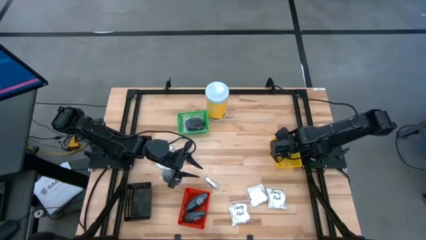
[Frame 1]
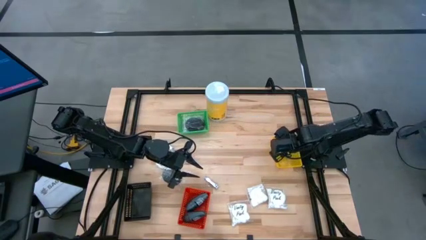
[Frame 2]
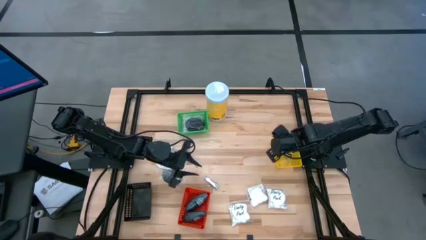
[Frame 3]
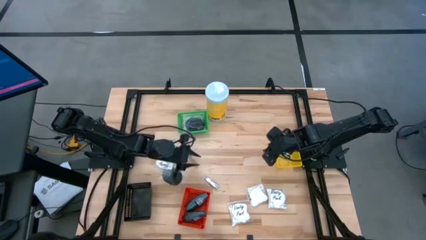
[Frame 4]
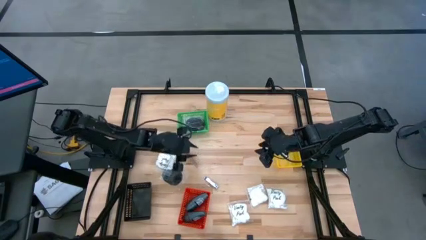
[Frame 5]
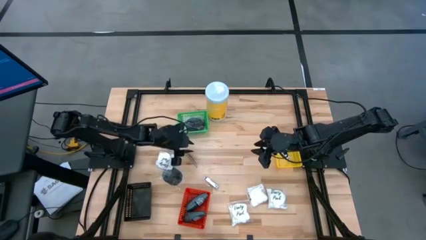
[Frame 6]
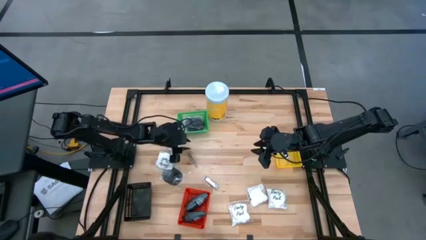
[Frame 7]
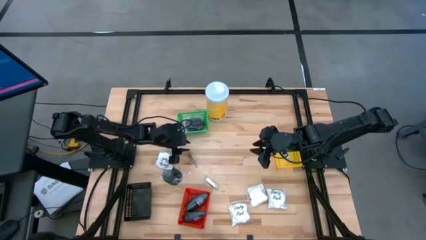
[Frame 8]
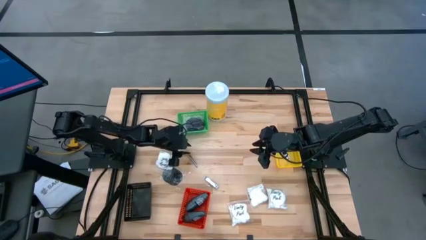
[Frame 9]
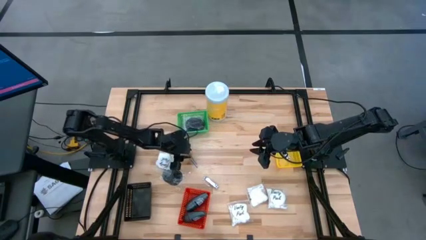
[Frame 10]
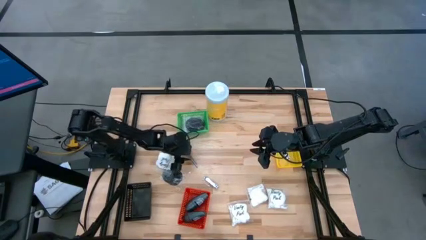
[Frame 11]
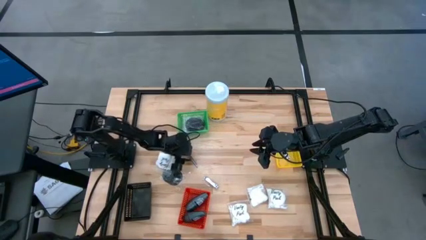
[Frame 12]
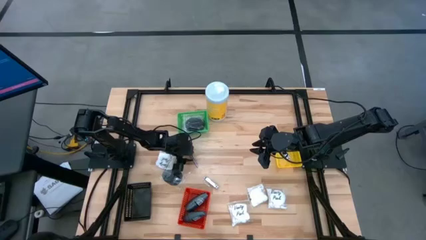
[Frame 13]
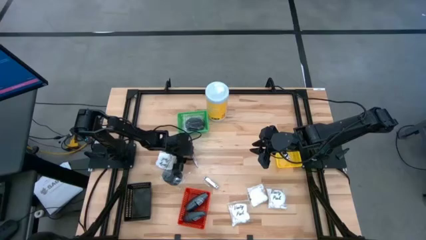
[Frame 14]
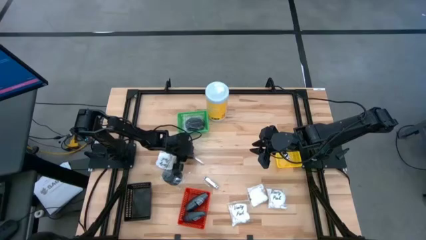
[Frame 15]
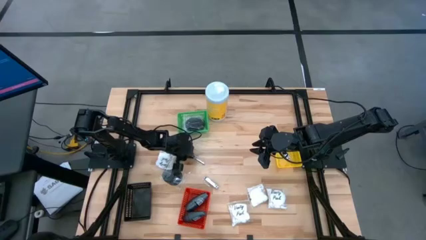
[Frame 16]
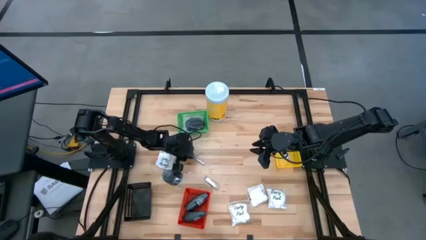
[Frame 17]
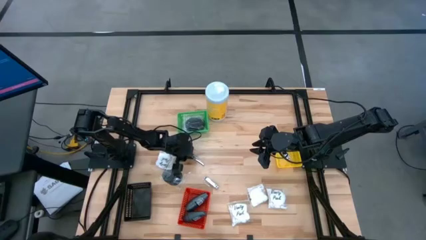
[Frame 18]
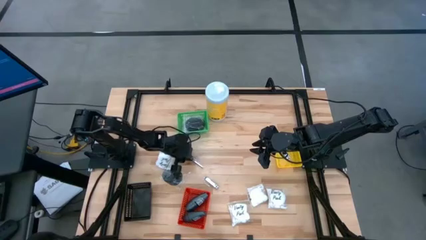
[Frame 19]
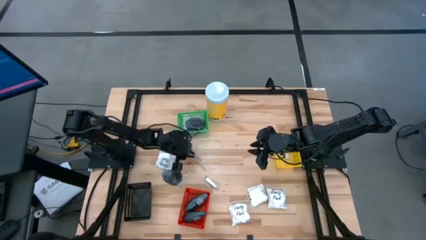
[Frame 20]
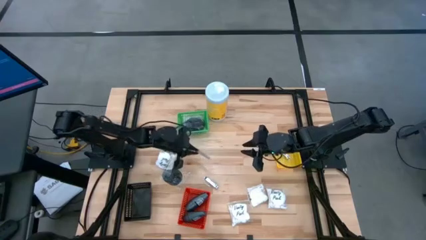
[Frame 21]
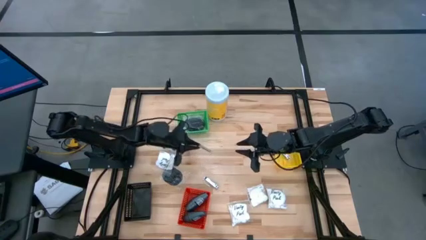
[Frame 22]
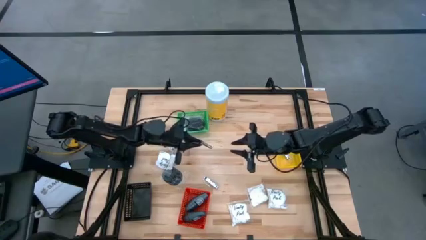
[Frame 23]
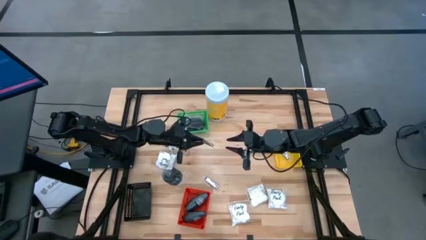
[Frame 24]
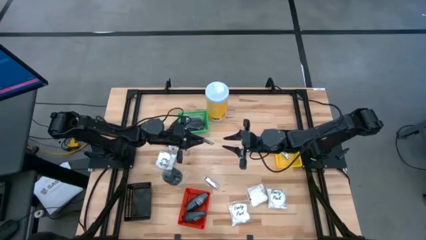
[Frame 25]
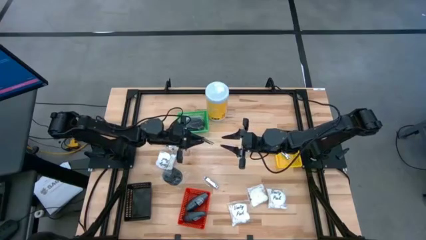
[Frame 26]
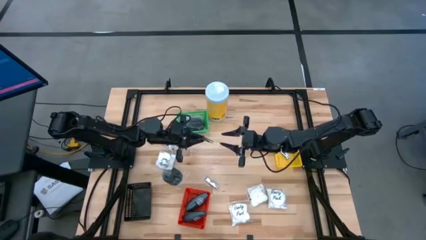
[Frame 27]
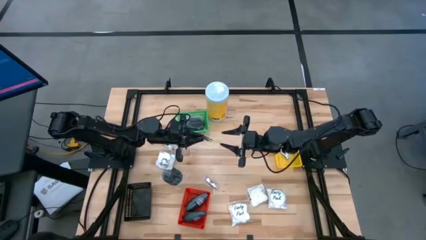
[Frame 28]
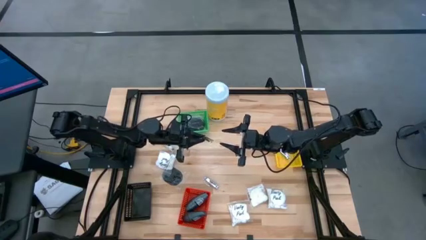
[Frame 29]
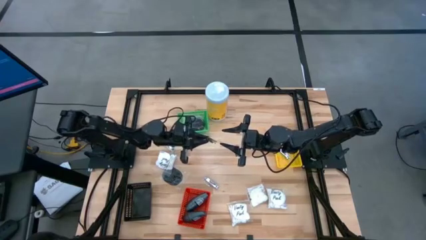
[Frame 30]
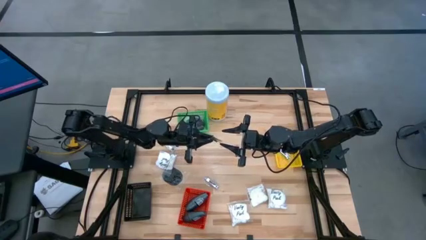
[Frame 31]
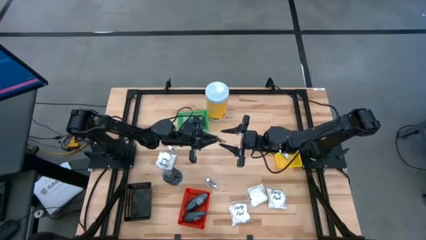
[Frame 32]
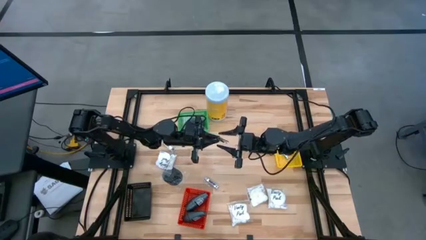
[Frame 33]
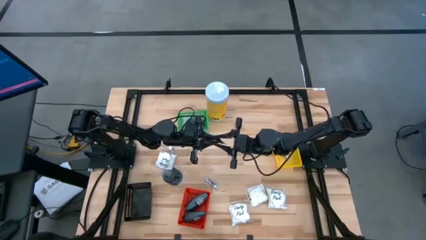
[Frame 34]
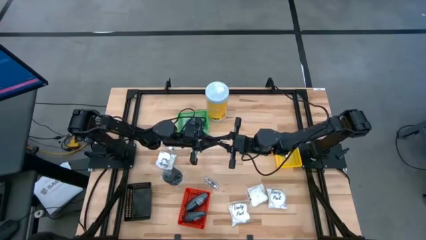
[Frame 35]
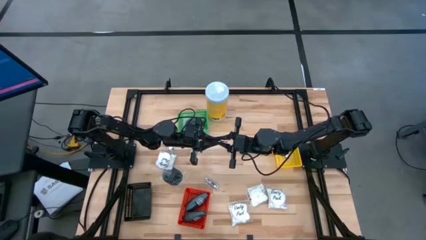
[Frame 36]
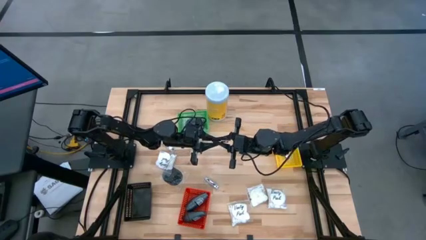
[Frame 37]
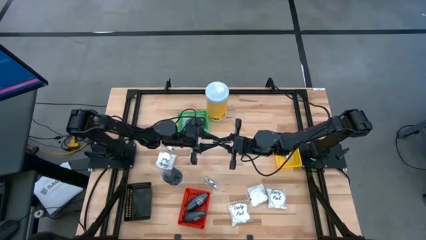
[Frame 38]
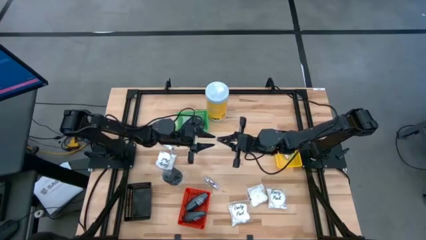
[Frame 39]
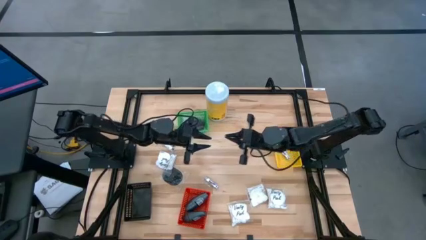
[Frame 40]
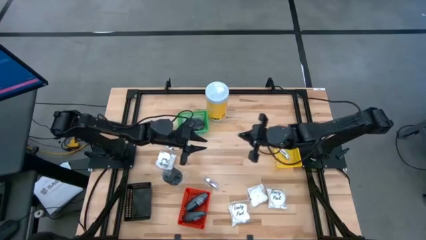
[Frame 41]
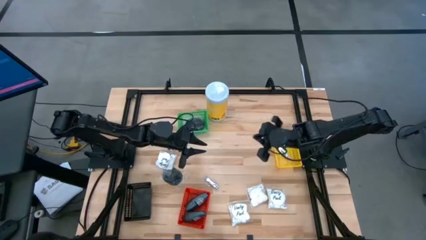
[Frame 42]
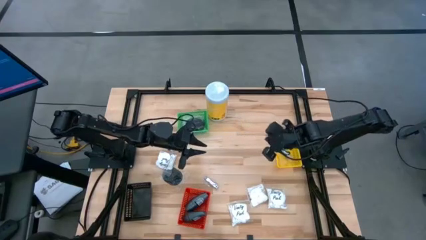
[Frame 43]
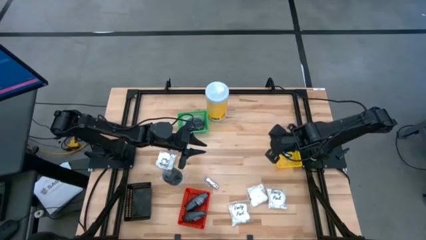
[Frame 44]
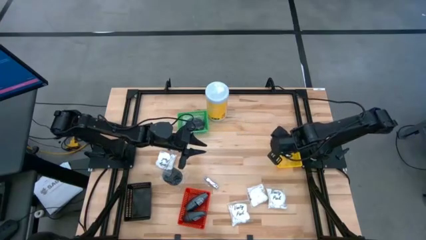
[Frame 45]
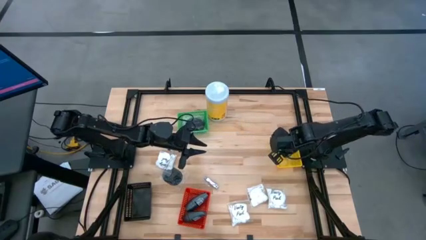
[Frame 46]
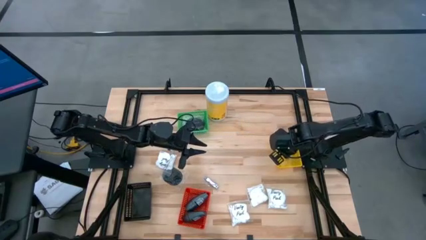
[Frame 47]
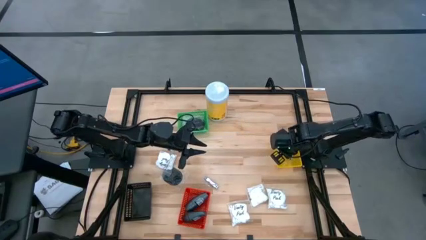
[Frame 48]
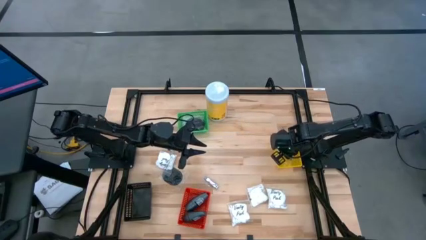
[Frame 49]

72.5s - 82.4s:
Task: Pick & Place Travel size toiletries
Put the silver nail cutter into the yellow bin

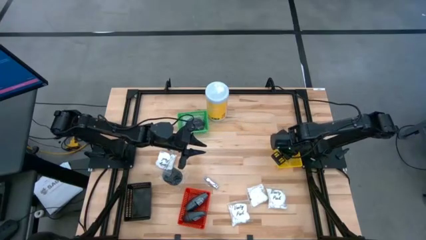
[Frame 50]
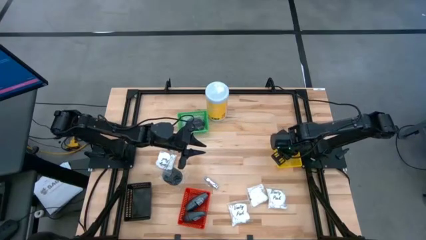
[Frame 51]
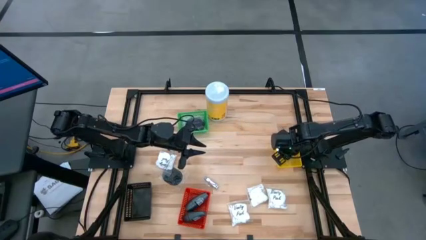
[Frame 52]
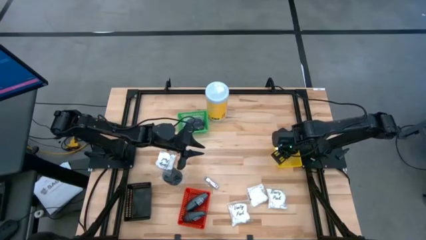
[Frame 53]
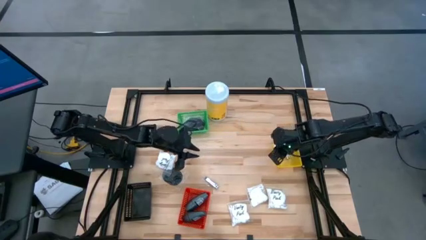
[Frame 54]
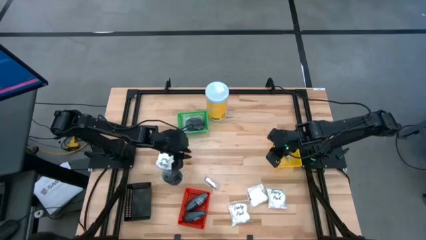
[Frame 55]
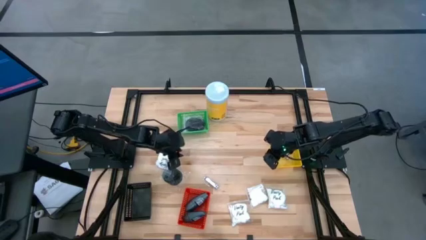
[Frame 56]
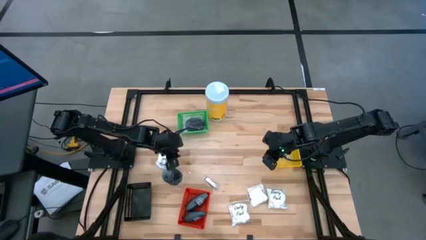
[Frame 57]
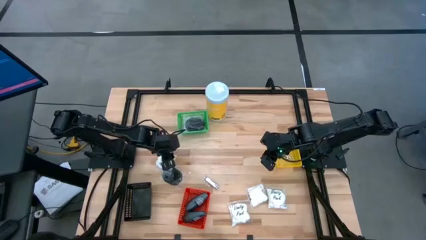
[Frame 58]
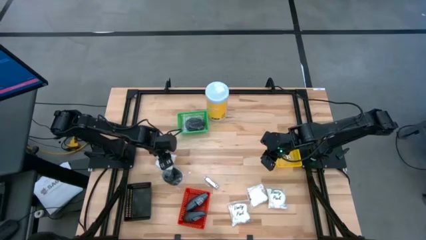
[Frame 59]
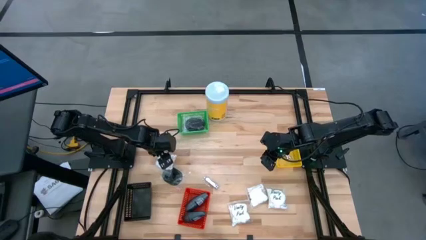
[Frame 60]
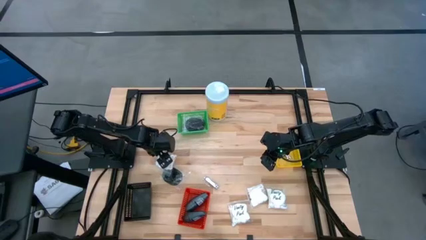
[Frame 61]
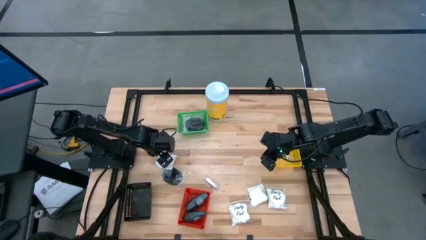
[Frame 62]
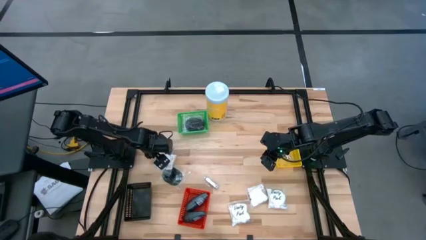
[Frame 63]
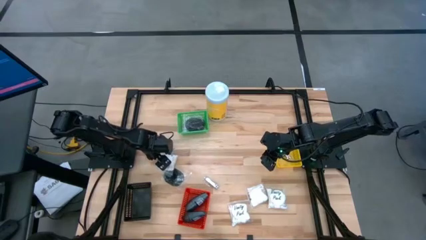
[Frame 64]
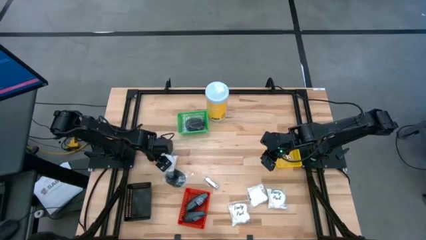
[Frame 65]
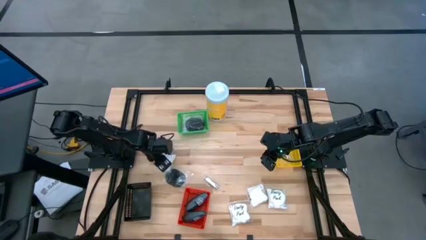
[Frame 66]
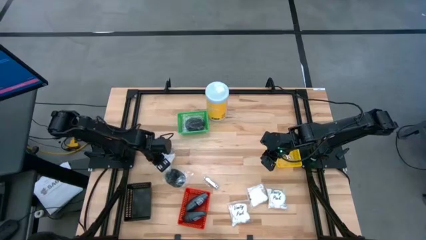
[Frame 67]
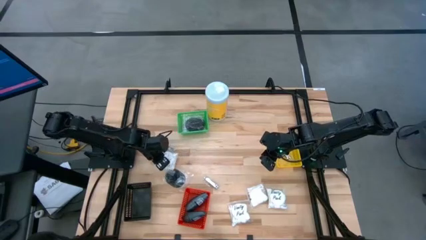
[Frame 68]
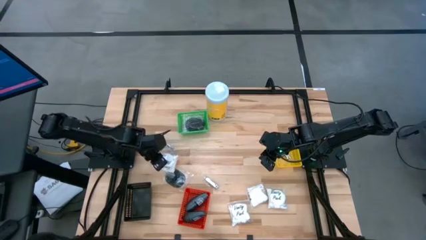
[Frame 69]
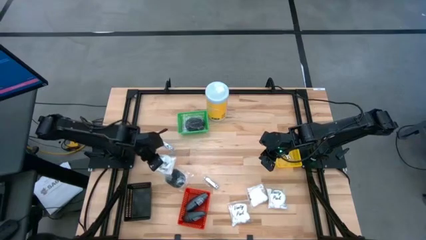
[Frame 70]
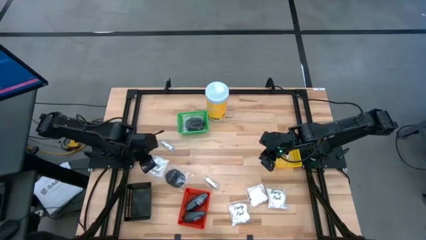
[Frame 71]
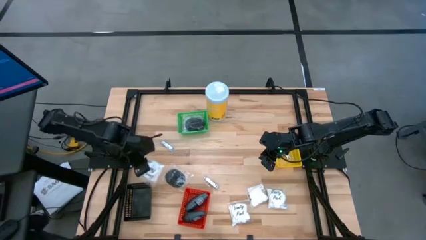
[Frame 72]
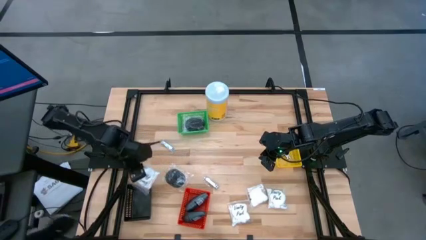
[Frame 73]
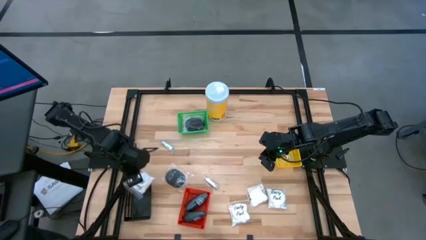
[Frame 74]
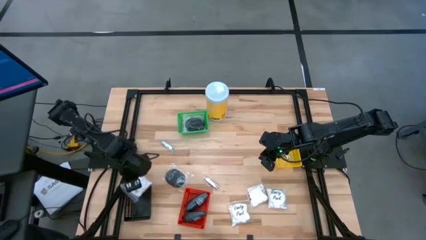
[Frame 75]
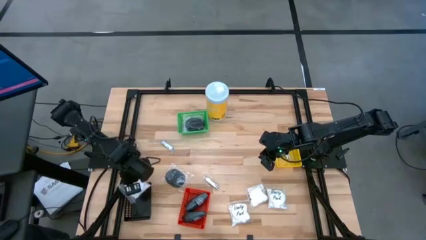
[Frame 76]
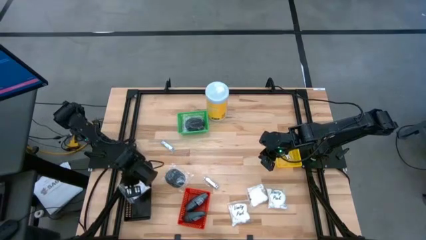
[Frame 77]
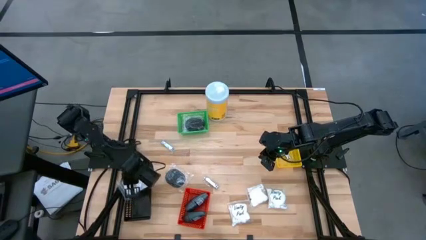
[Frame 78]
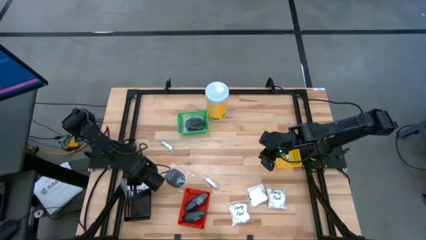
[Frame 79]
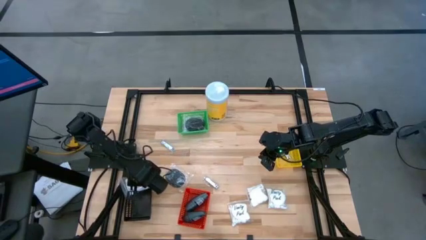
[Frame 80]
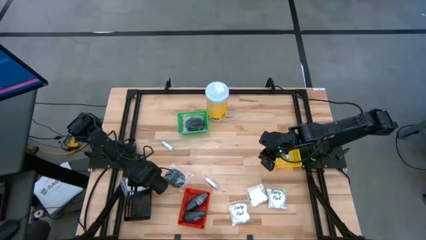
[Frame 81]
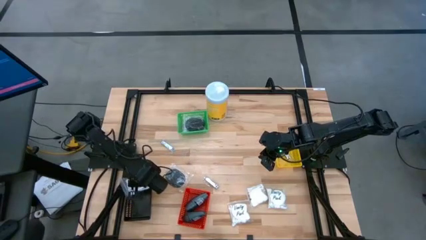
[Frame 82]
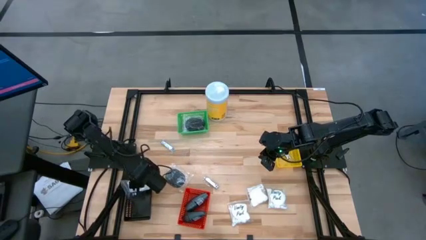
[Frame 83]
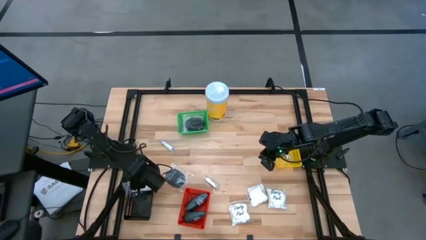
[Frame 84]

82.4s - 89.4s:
Put the white cotton pack into the black bin

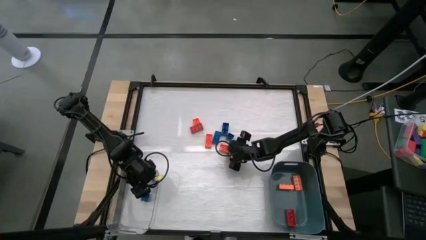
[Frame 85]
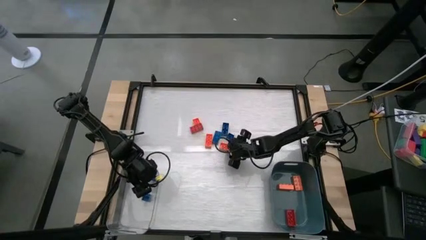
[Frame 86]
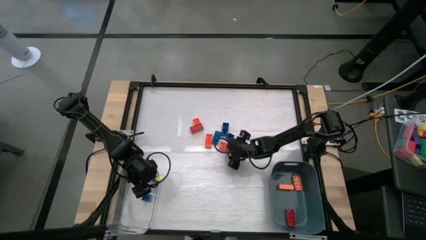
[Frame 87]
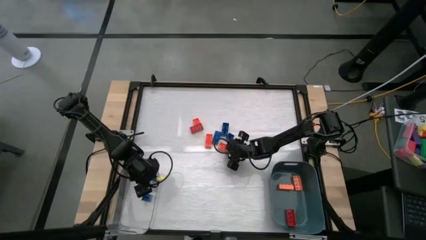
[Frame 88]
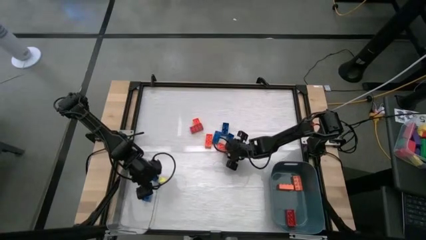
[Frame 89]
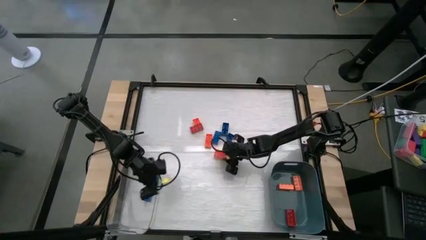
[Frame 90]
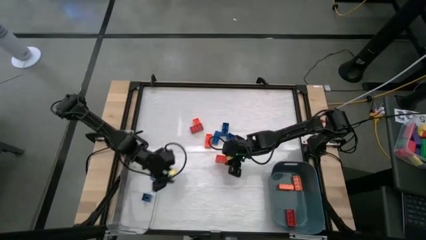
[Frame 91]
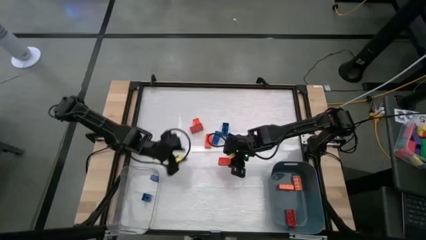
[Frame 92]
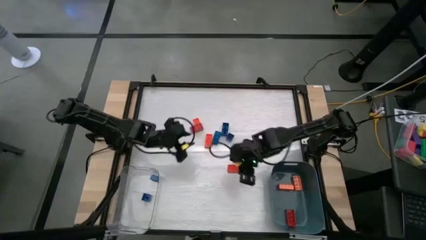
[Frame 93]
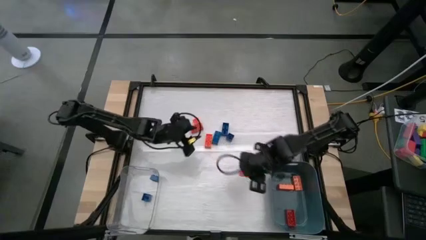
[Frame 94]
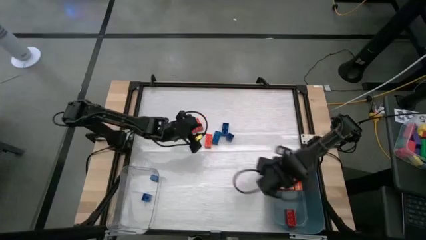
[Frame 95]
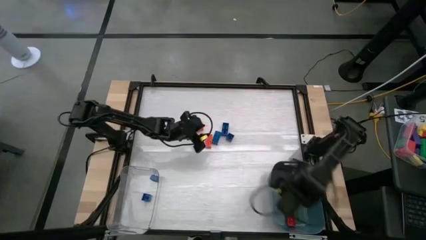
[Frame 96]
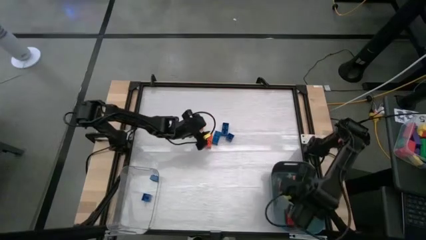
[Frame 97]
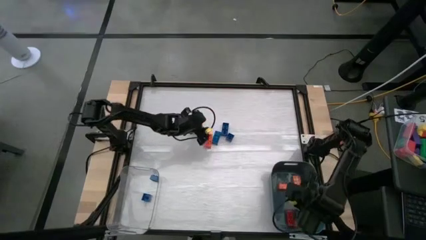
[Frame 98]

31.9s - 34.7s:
Task: Sort blocks by size
Put the large orange game piece into the blue bin
